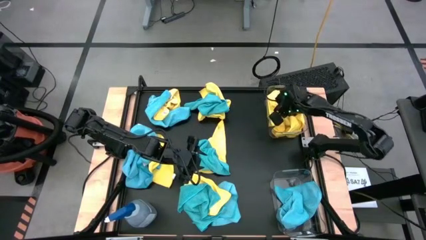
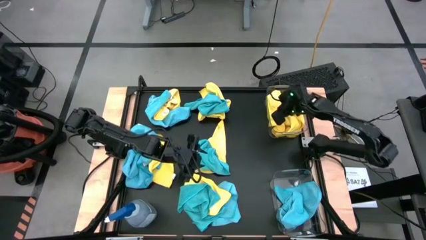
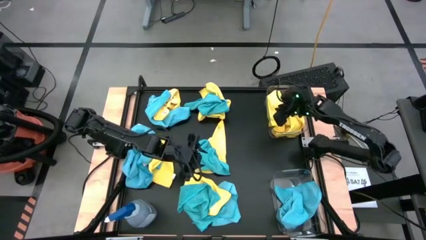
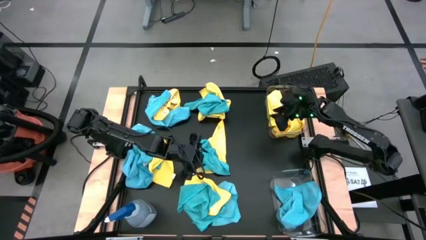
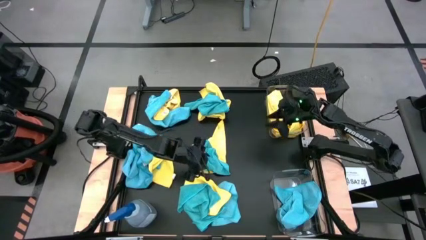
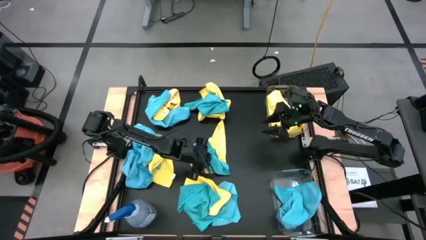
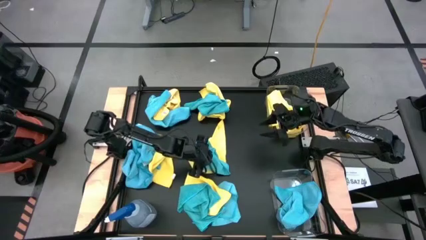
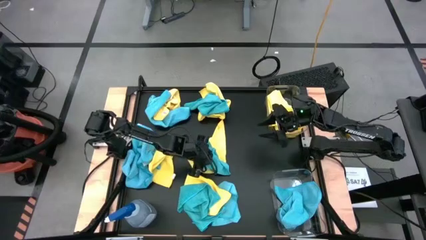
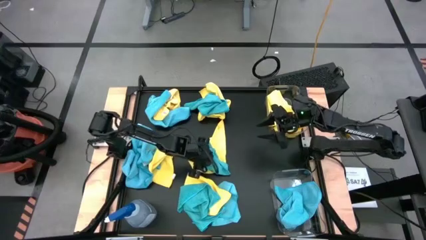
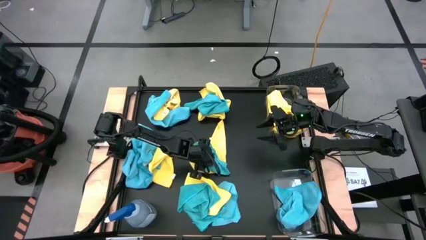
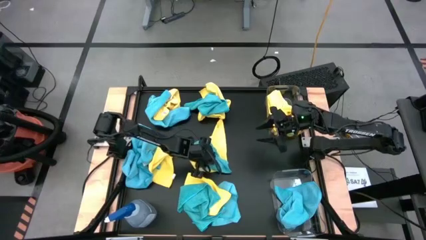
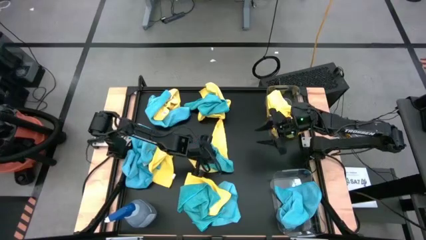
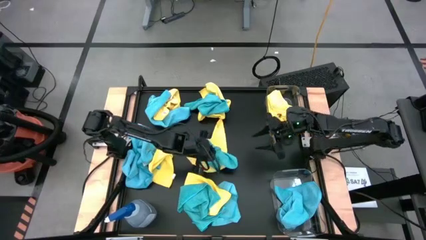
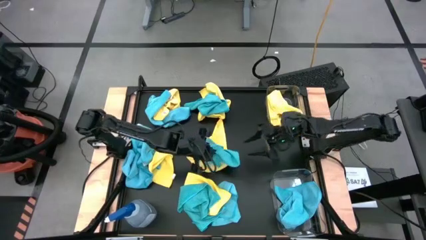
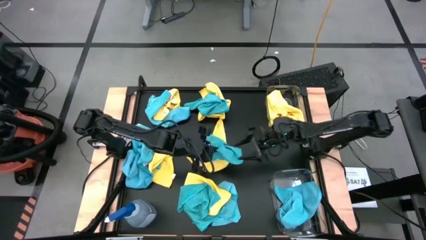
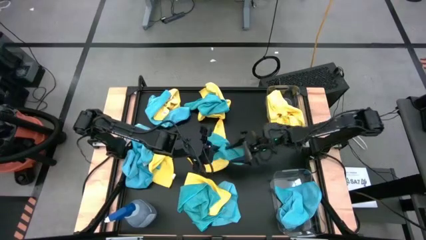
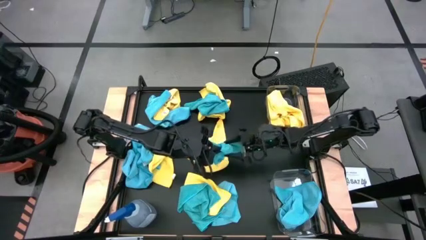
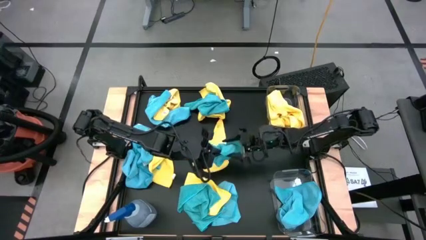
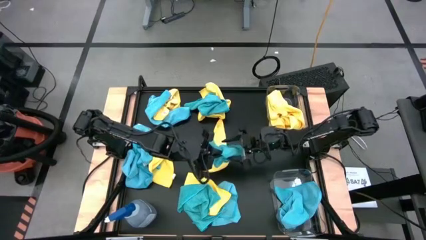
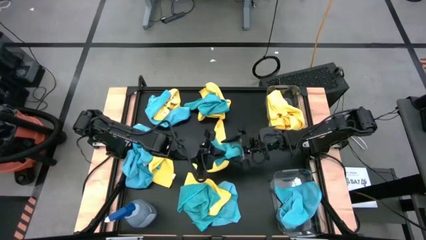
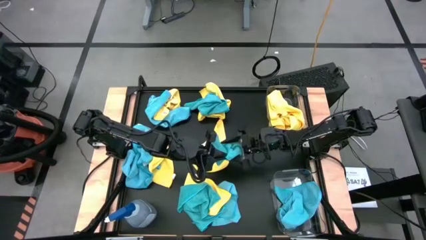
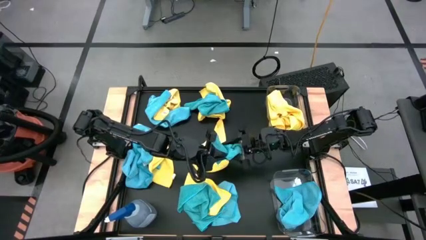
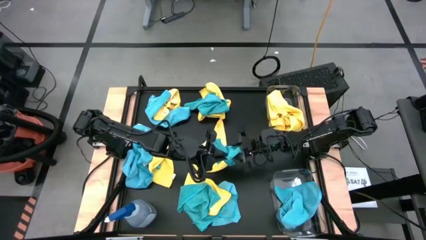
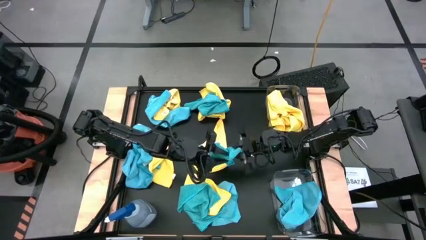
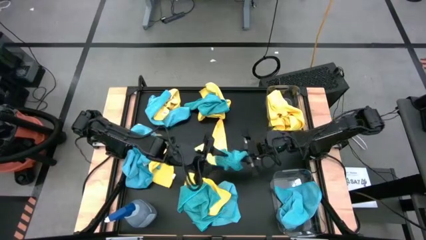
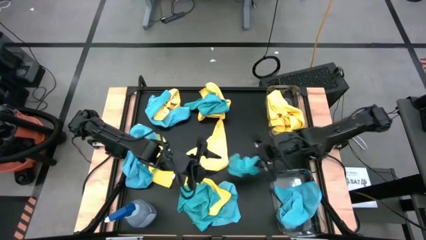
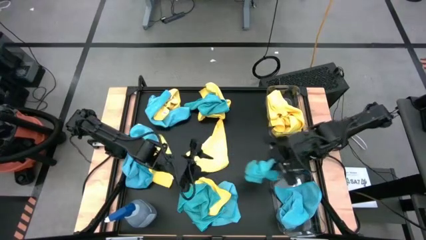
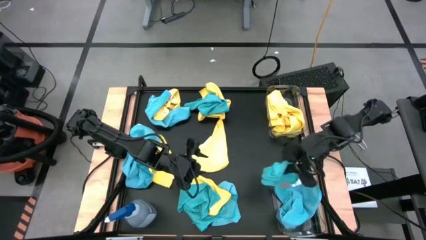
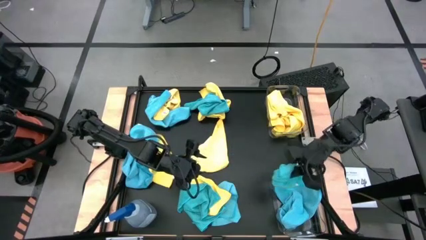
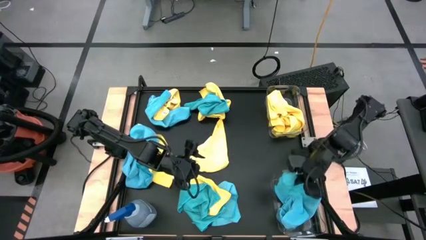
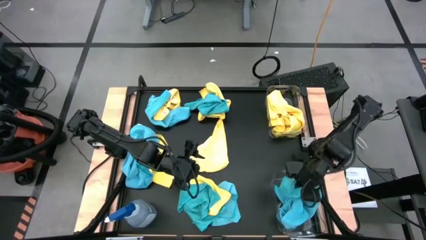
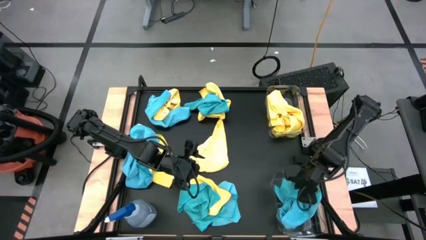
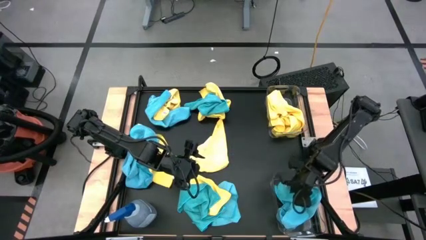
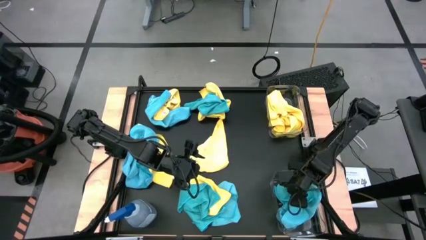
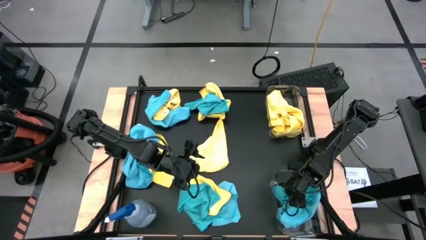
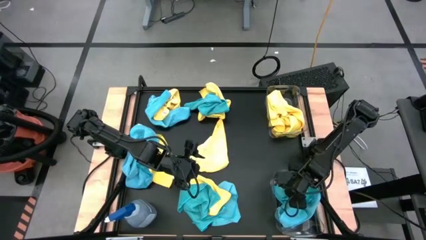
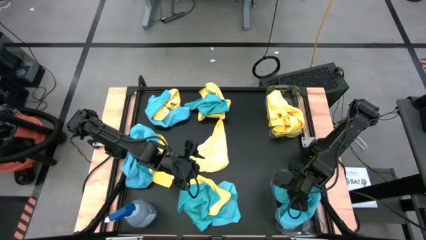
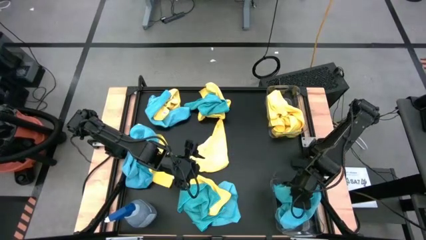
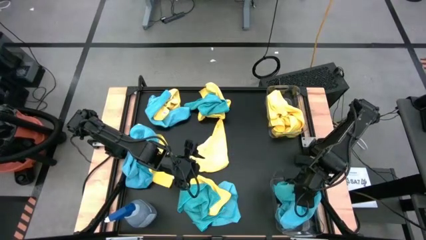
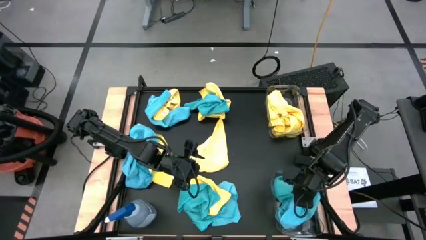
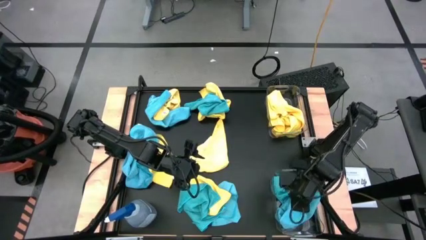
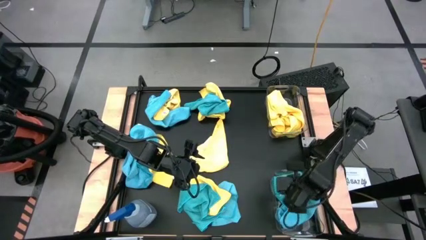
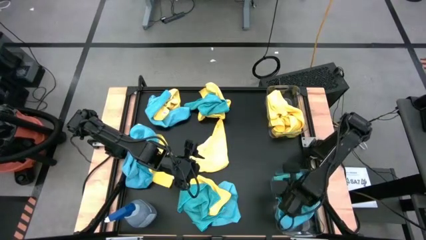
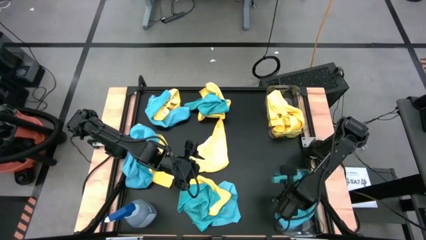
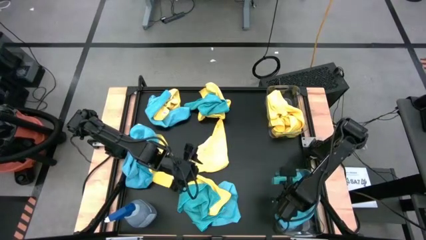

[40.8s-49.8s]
Task: Sort microfiber towel by color & place in baskets
Put the blue towel into the bottom transparent bin

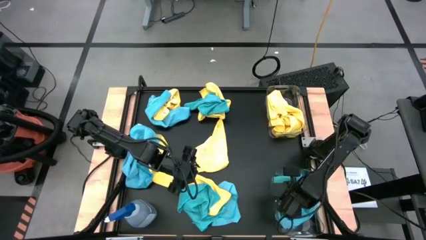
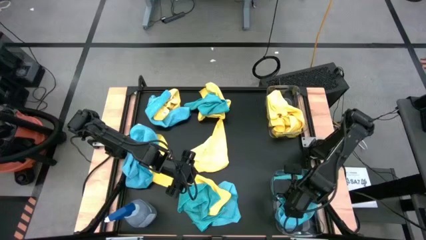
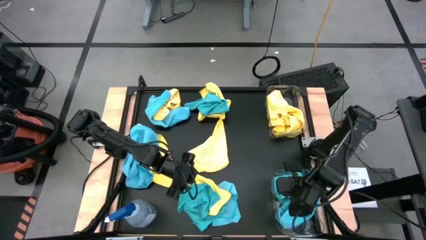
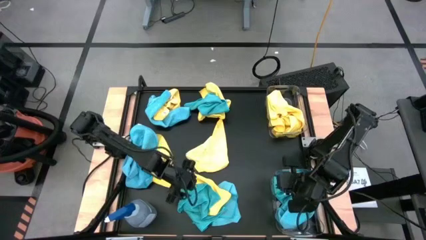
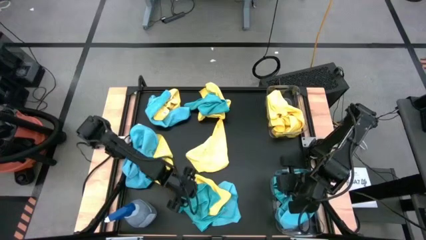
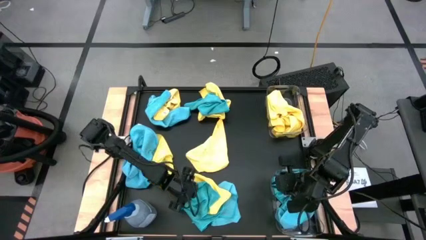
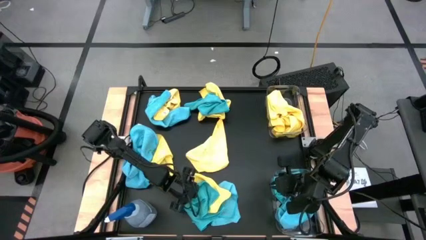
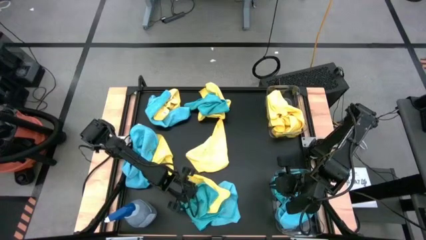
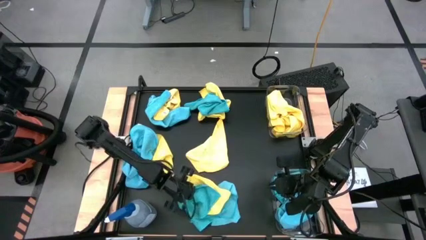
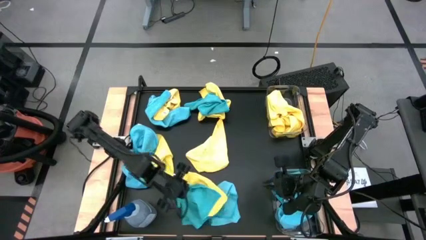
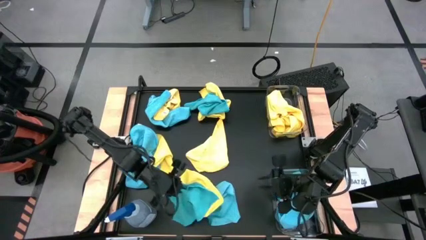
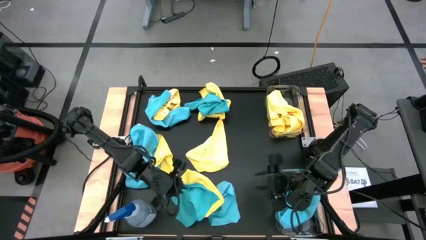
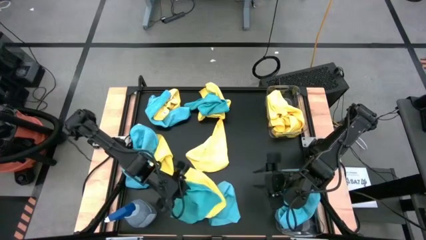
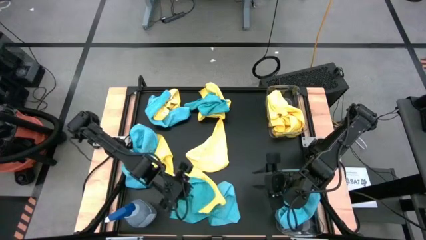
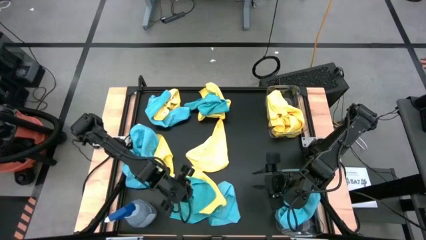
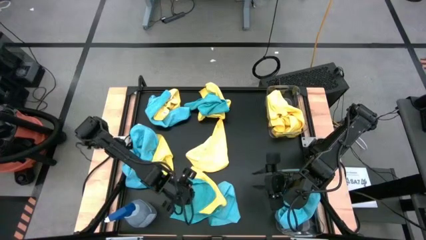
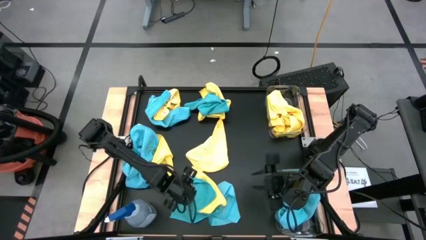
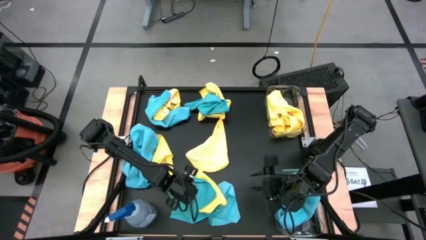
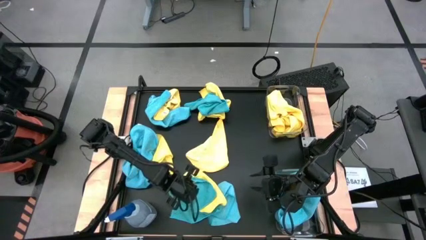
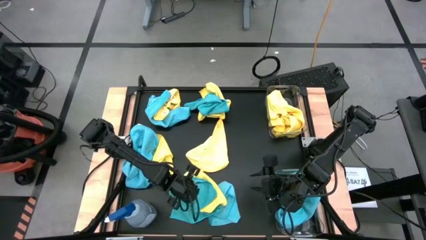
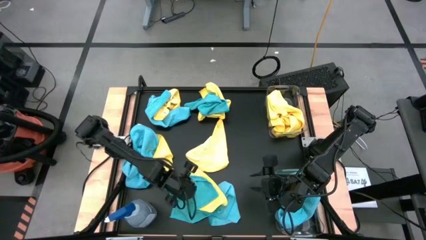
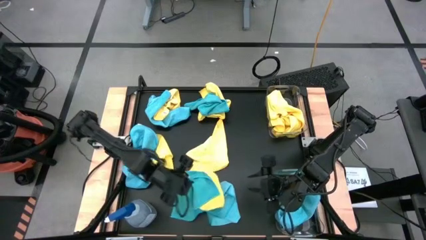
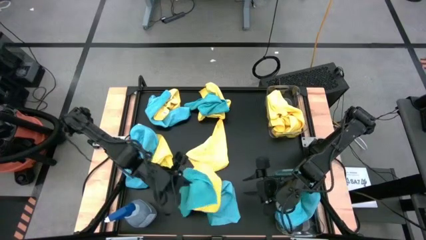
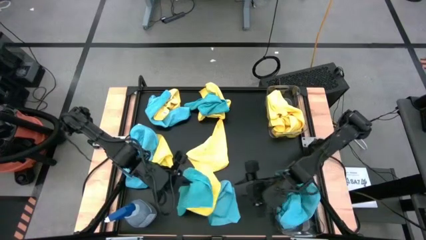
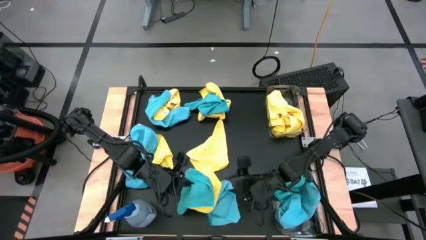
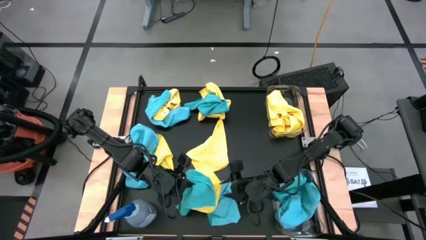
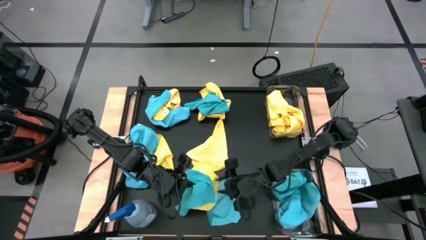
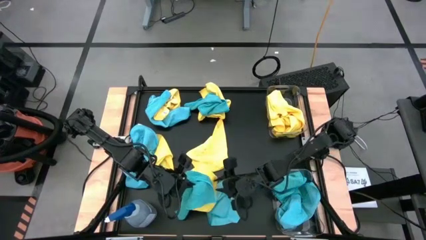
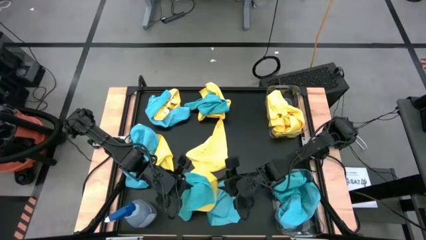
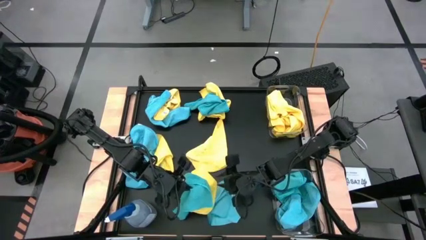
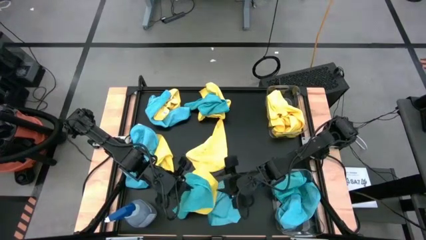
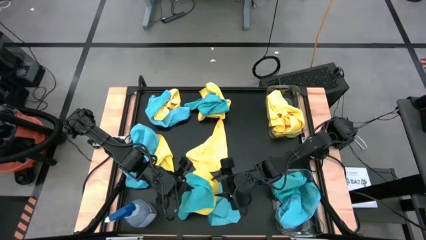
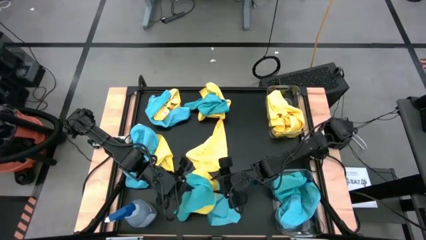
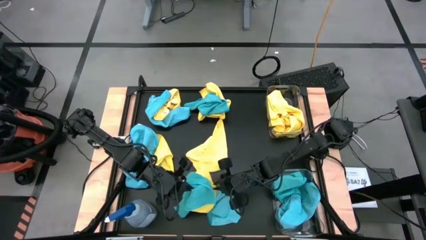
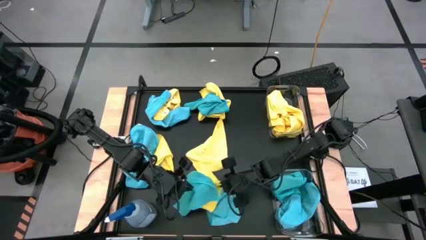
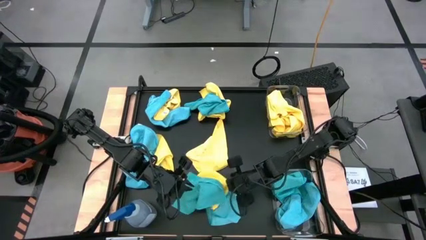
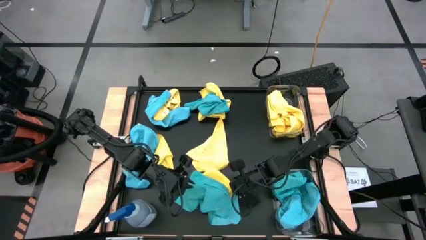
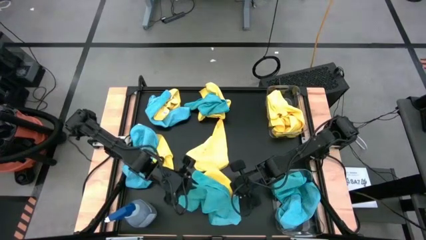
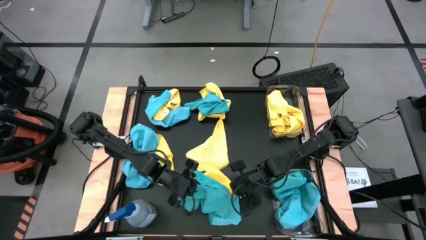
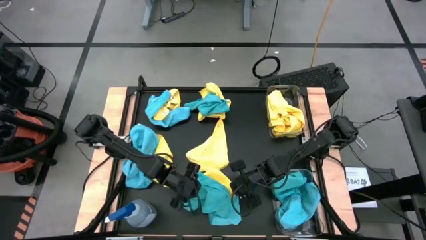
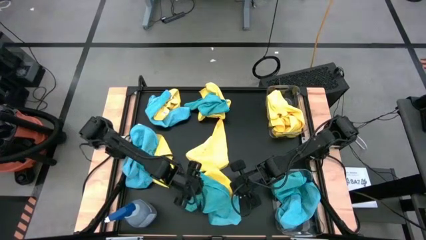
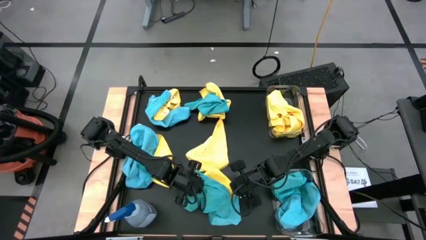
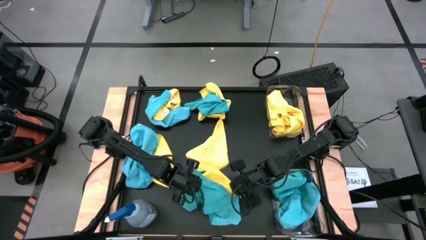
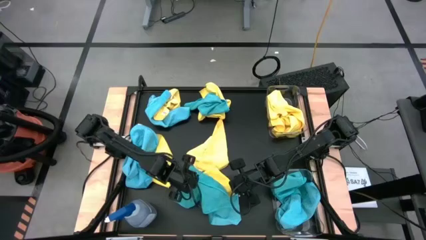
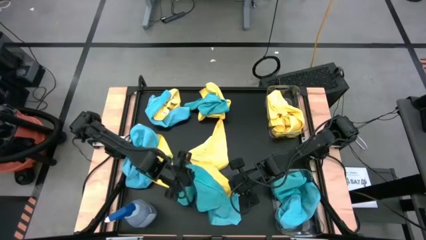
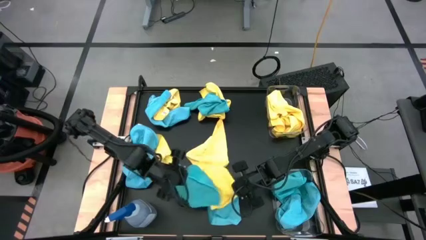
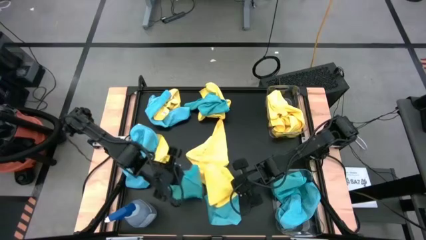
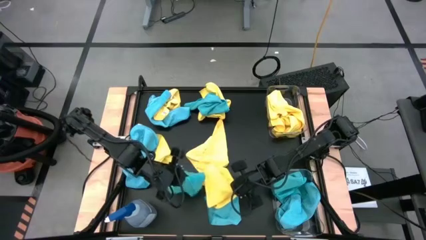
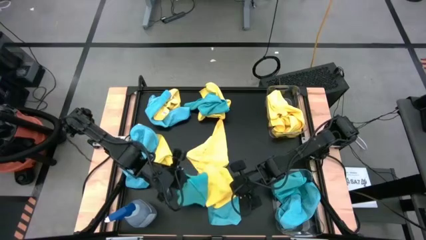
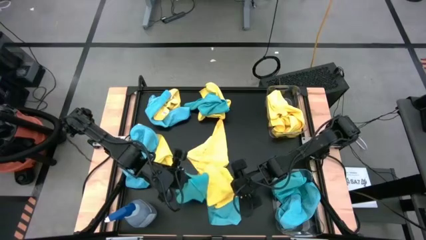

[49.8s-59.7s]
Put the blue towel into the bottom transparent bin
